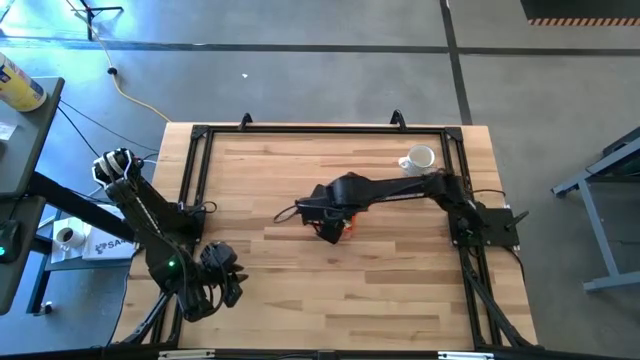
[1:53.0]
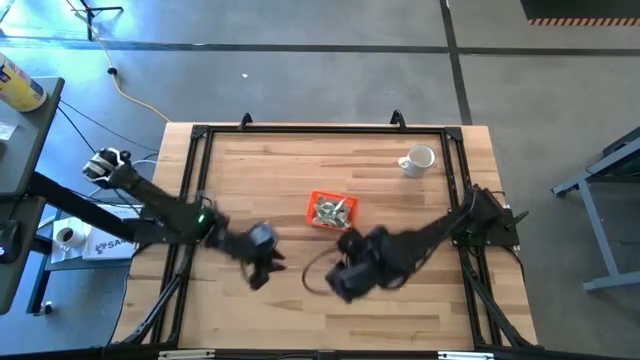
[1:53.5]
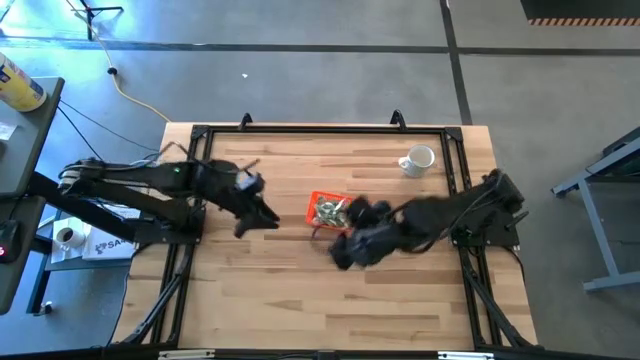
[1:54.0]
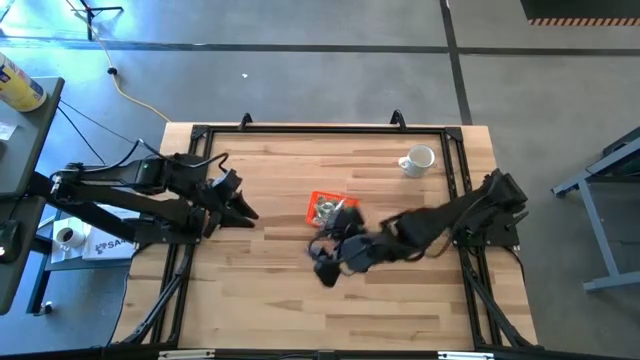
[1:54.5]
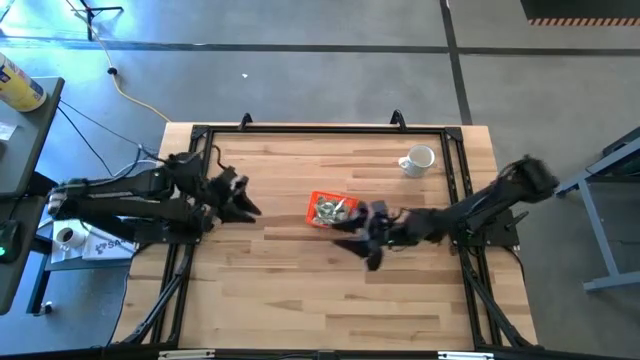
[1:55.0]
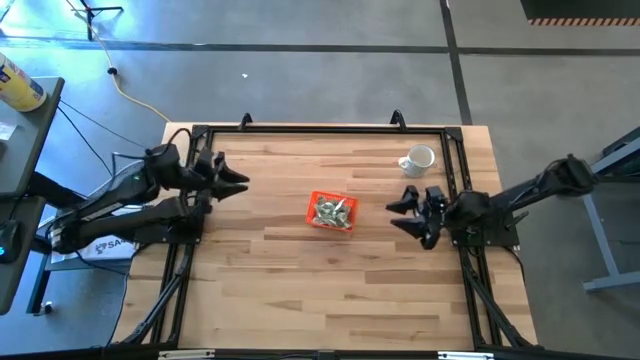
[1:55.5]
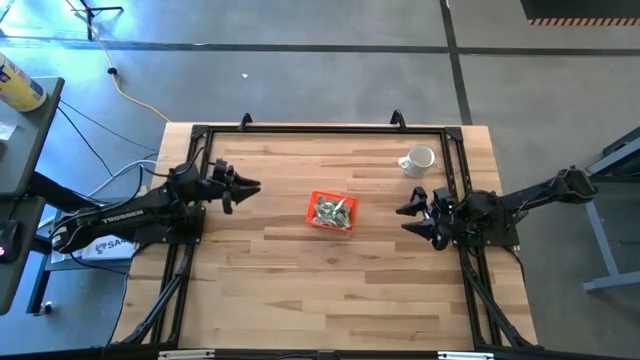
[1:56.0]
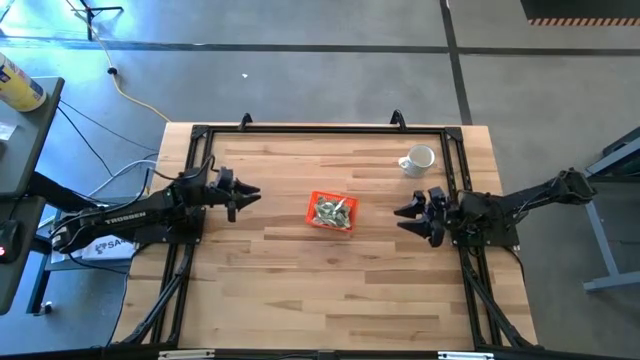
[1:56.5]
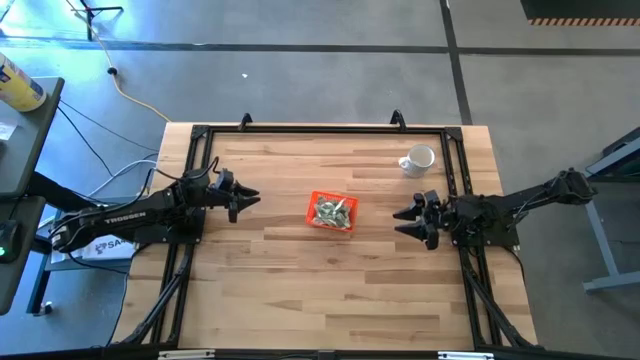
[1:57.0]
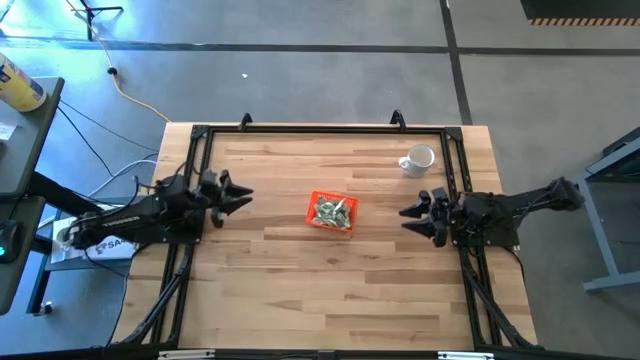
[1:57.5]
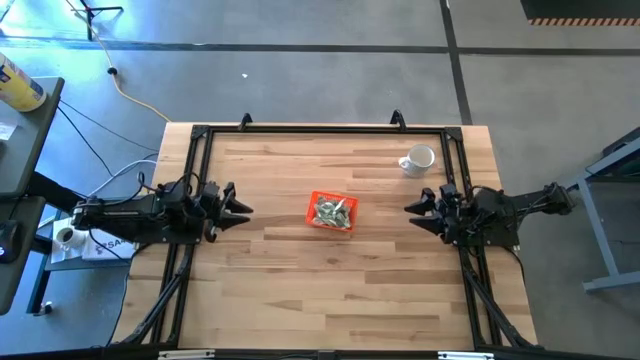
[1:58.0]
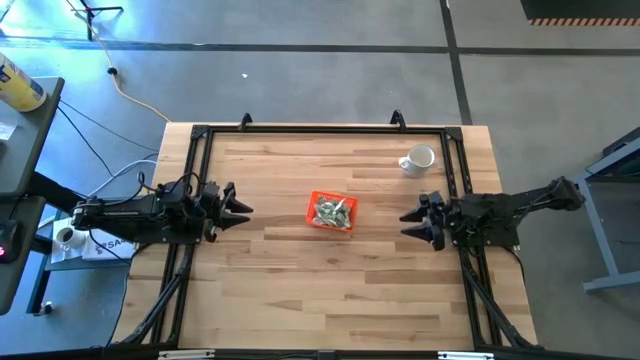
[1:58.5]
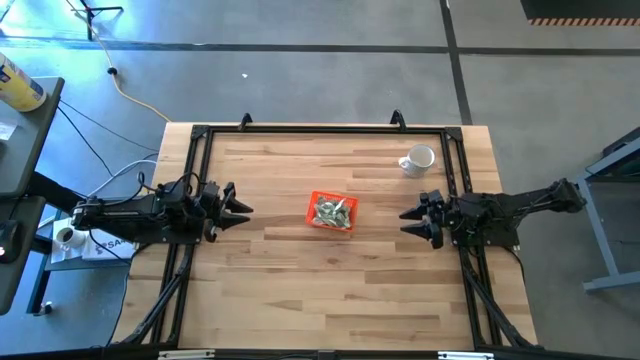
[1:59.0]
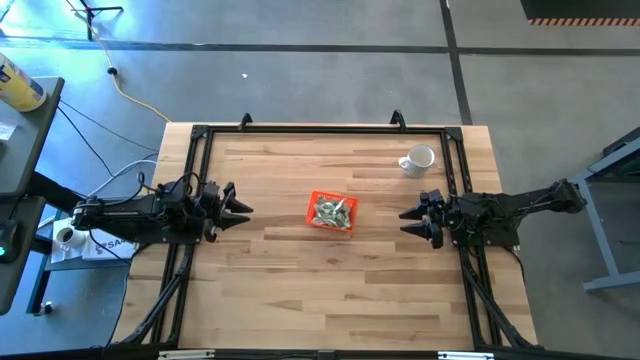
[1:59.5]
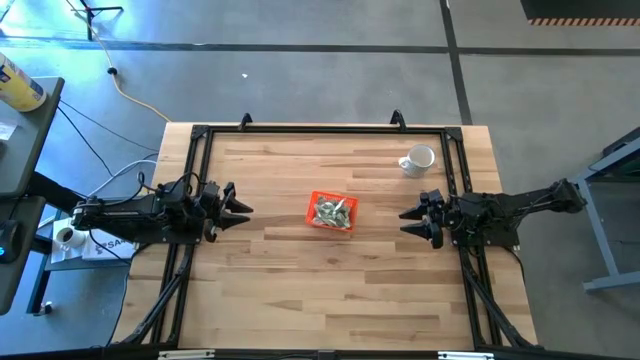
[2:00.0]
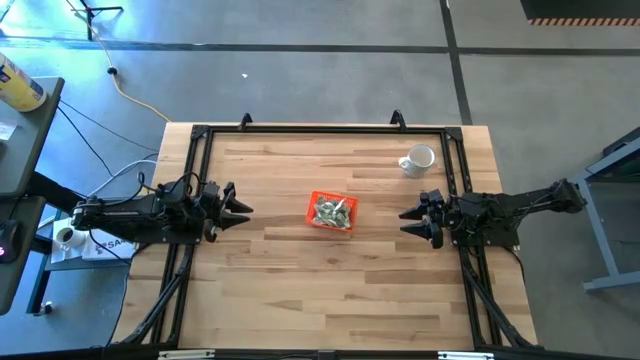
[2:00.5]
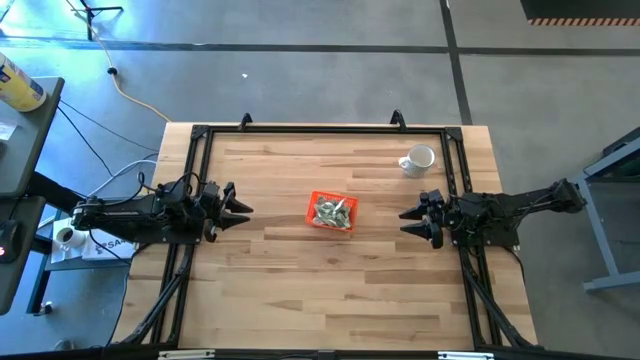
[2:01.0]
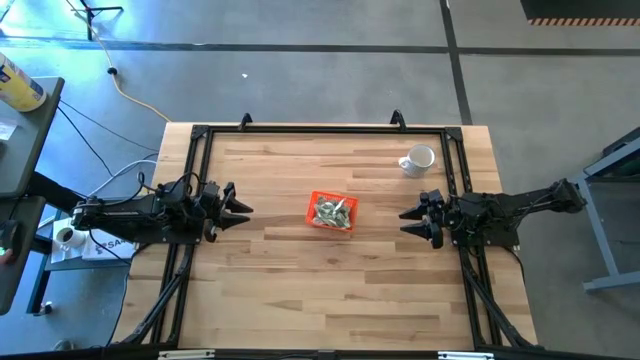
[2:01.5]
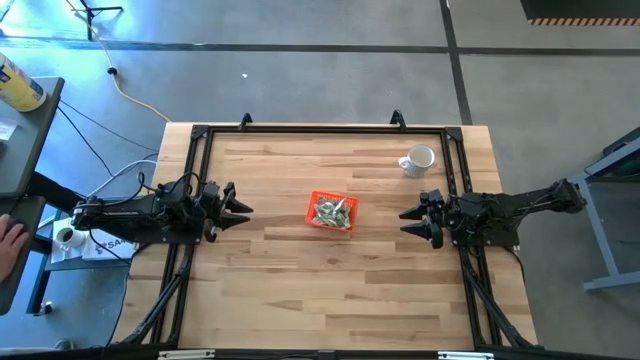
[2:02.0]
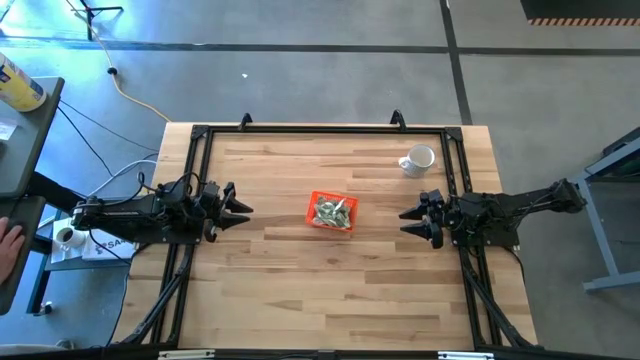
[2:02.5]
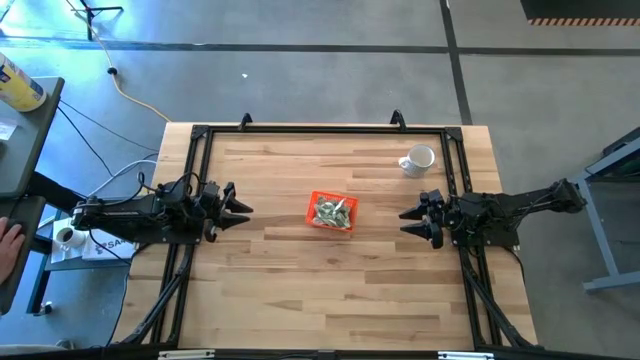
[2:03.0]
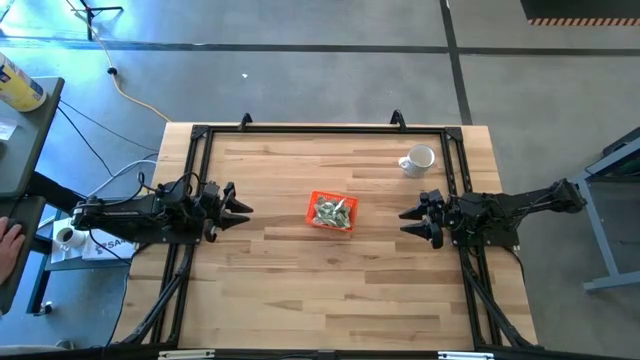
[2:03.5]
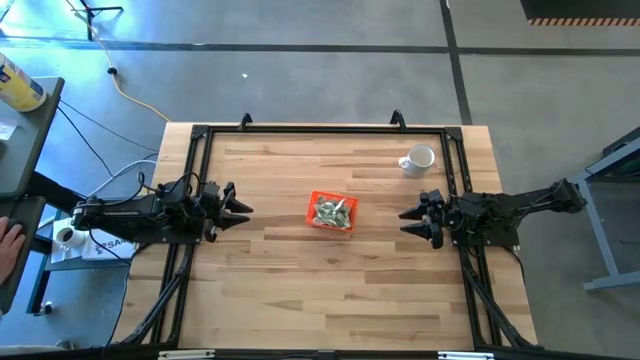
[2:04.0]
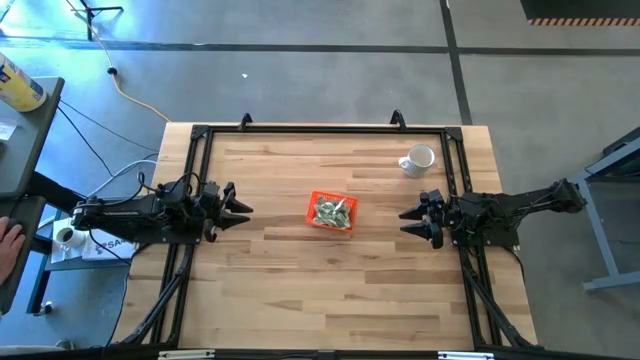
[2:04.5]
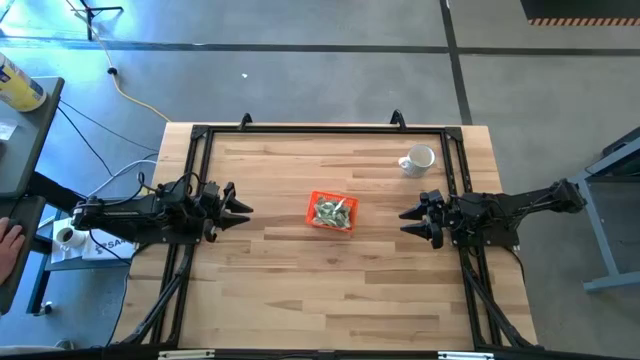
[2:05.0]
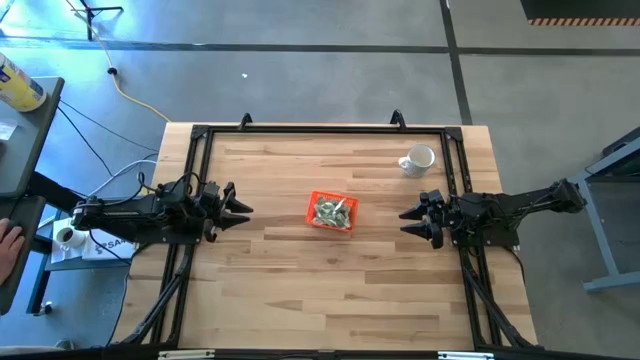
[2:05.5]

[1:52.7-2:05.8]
Task: Pick and place Stevia / Truvia into bins
Return to Home Position

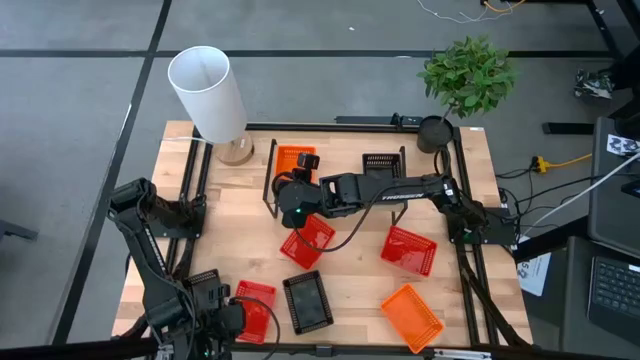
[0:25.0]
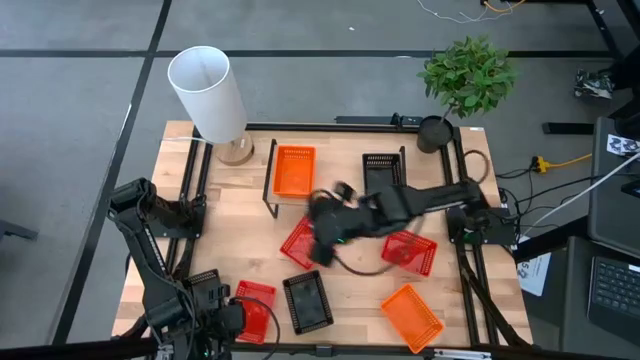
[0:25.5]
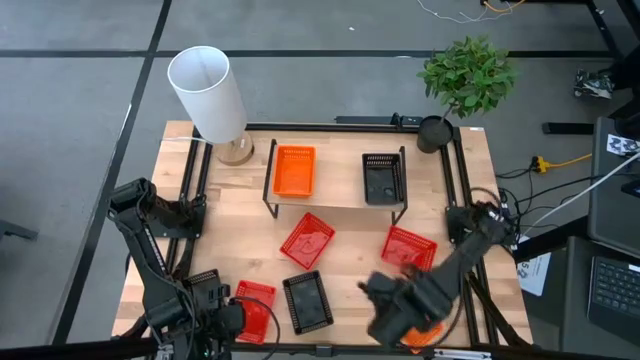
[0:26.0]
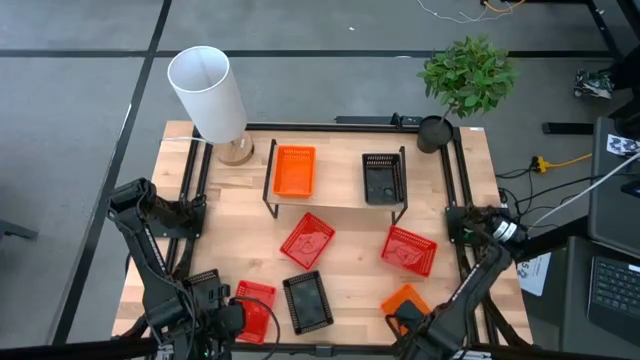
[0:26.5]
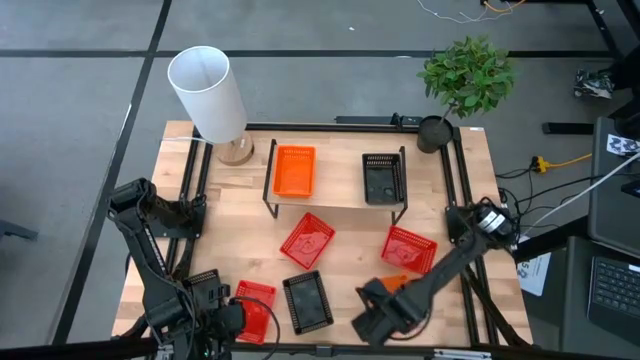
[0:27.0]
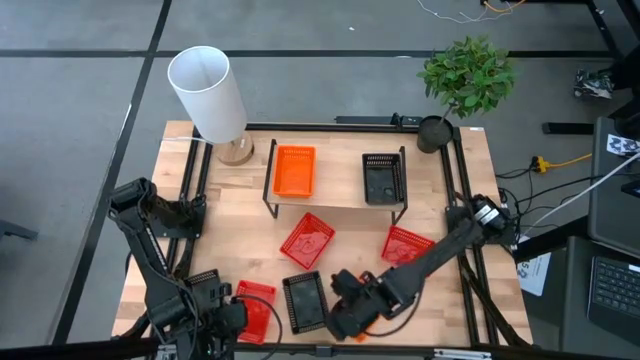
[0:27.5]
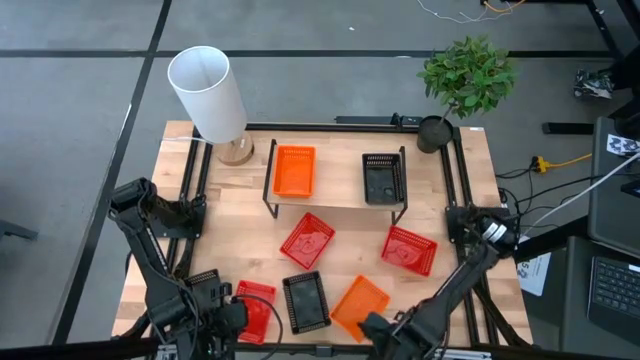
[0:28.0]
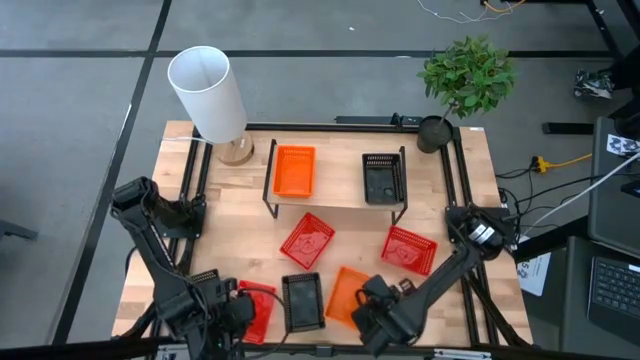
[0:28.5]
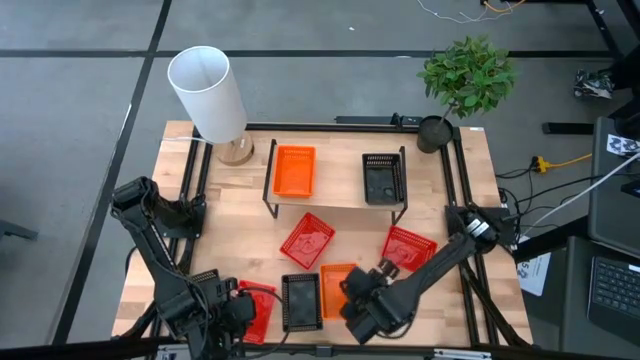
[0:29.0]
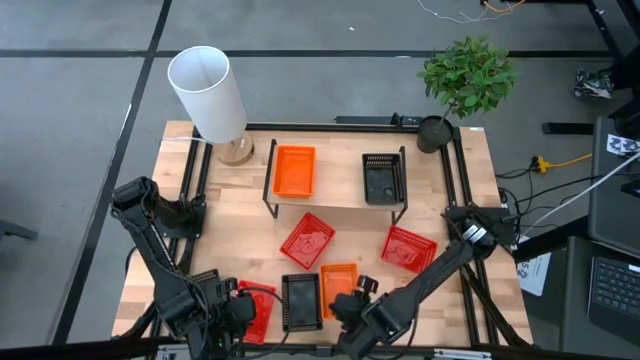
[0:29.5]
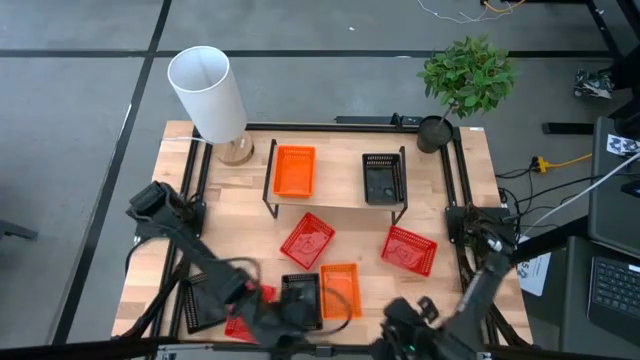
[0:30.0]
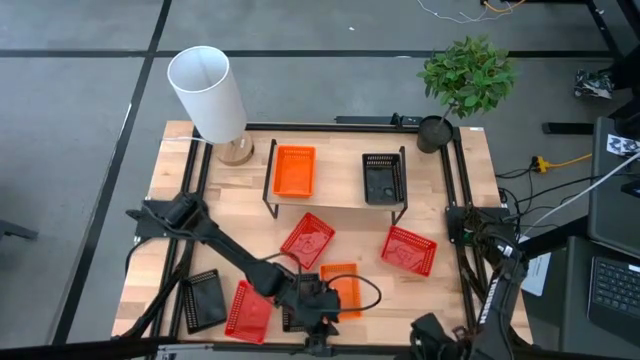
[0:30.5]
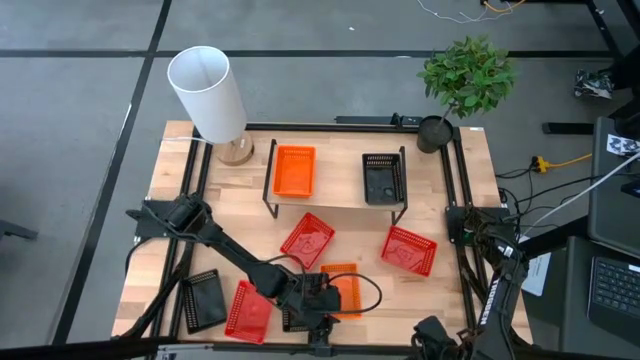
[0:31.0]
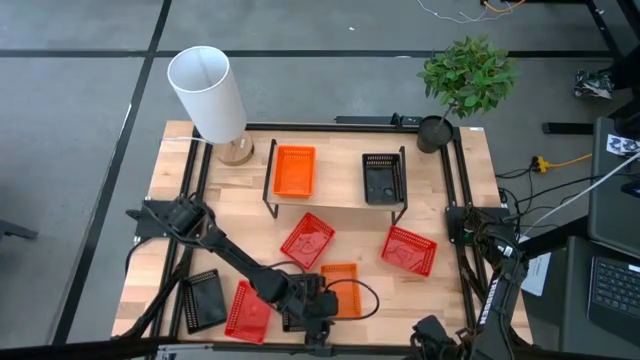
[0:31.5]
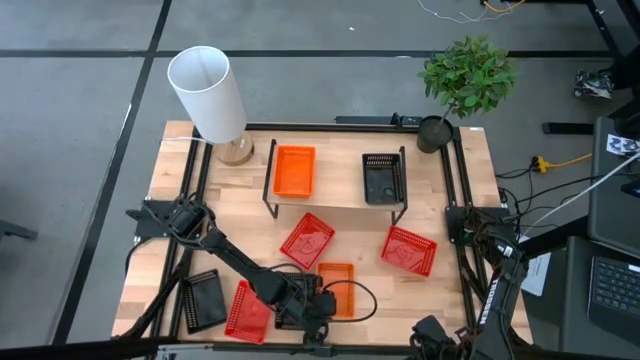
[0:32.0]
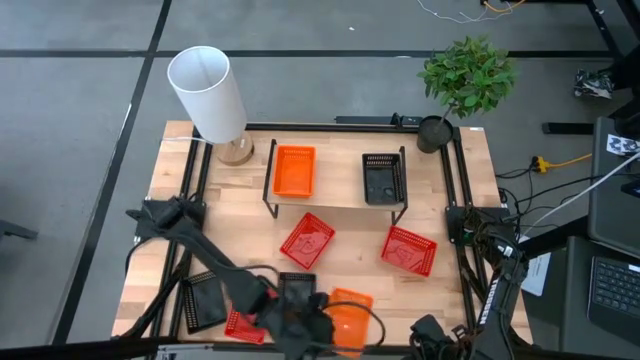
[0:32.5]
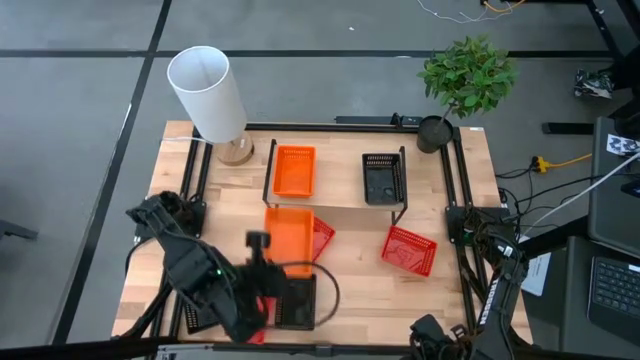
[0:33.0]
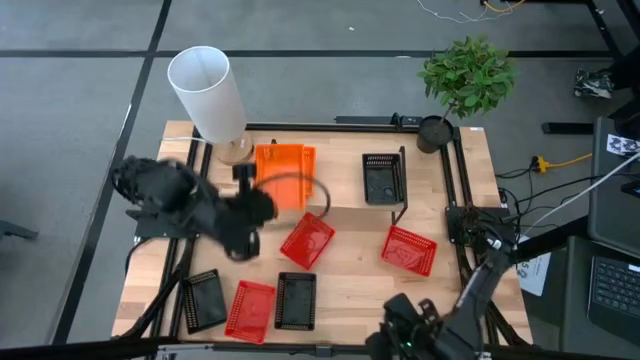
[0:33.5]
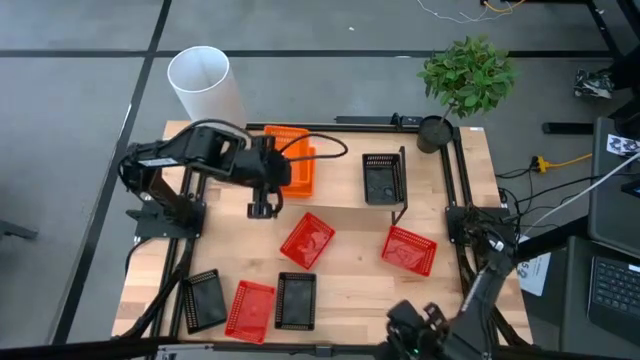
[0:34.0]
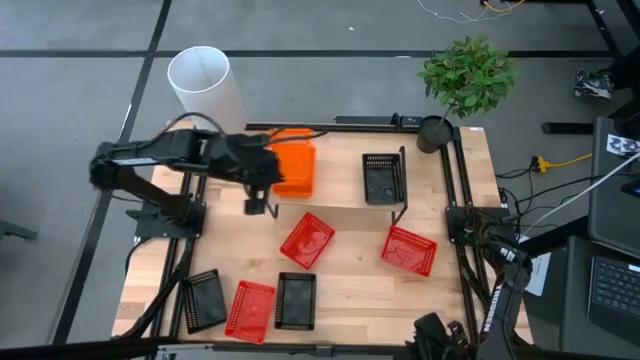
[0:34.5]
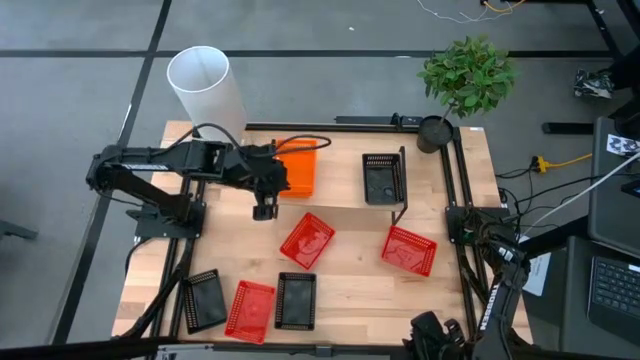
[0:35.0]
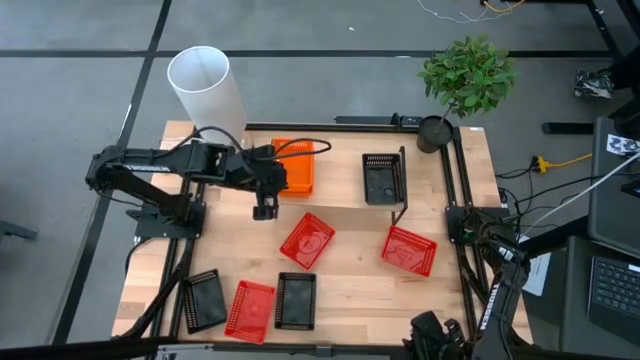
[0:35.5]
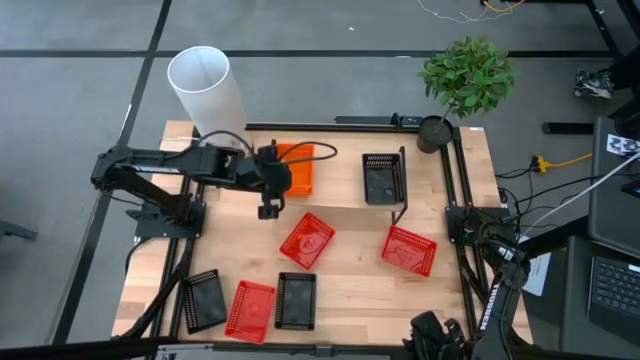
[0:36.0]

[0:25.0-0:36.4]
Task: Stack baskets on shelf by color
Stack the orange bin on top of the other orange bins on the shelf
